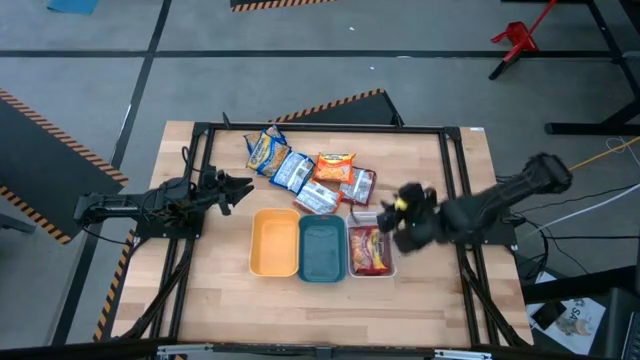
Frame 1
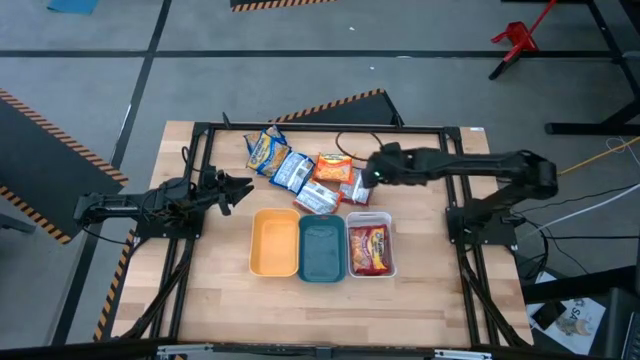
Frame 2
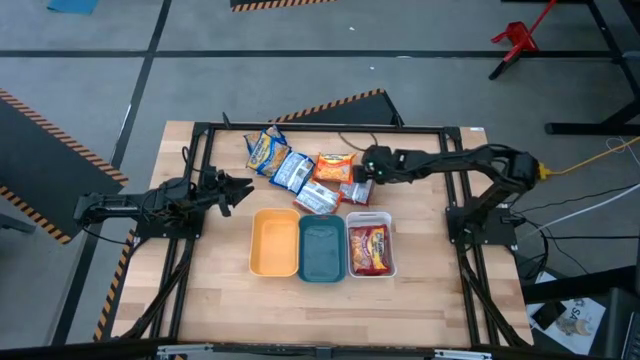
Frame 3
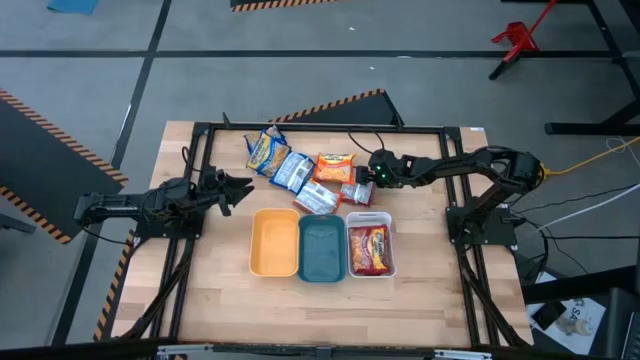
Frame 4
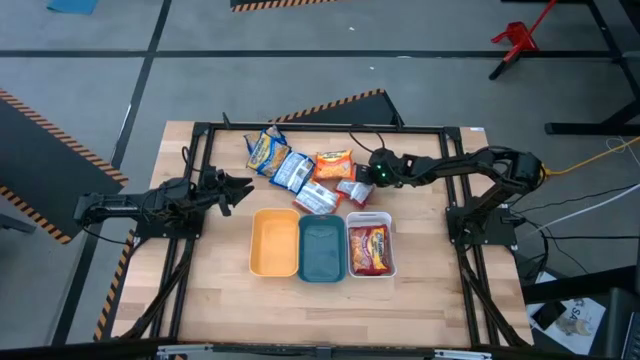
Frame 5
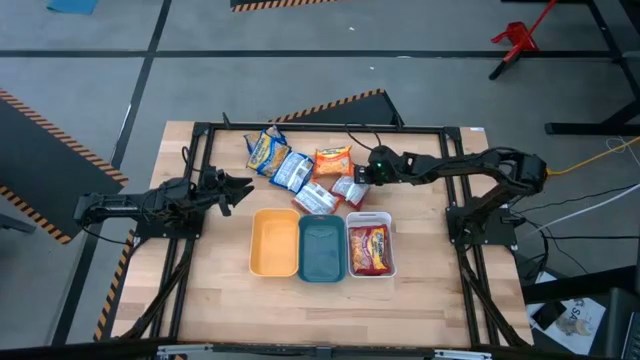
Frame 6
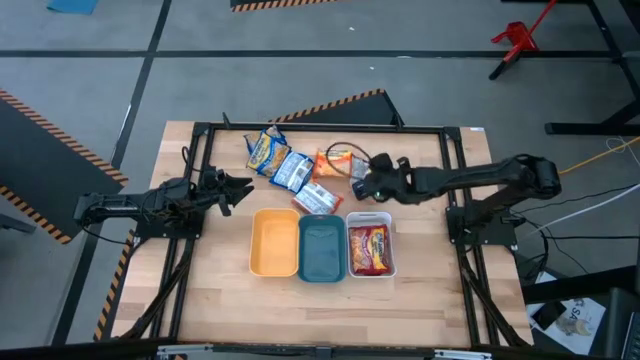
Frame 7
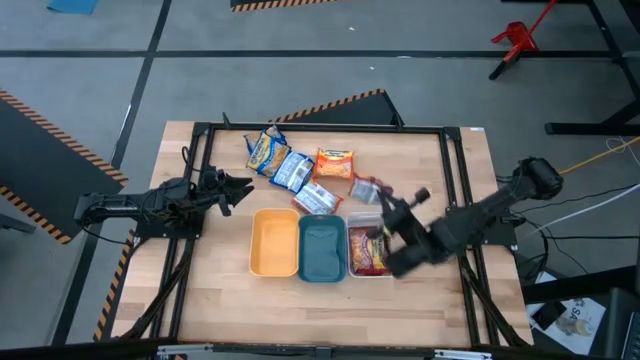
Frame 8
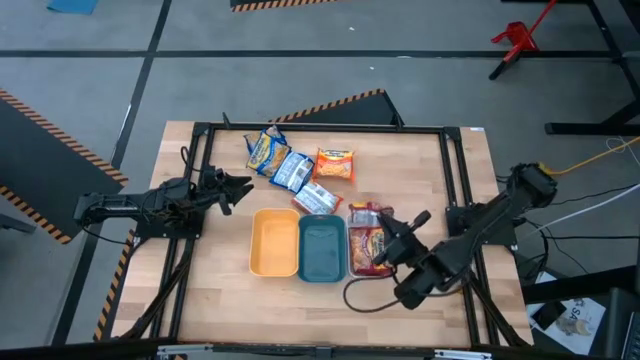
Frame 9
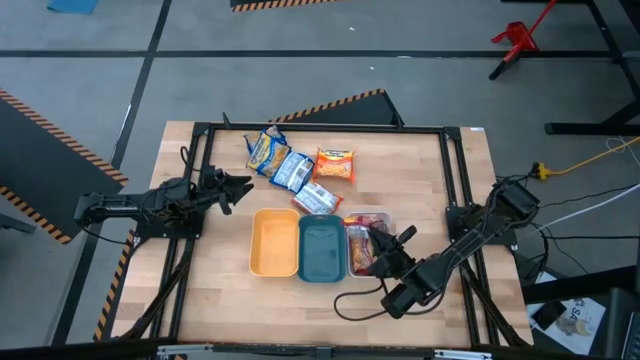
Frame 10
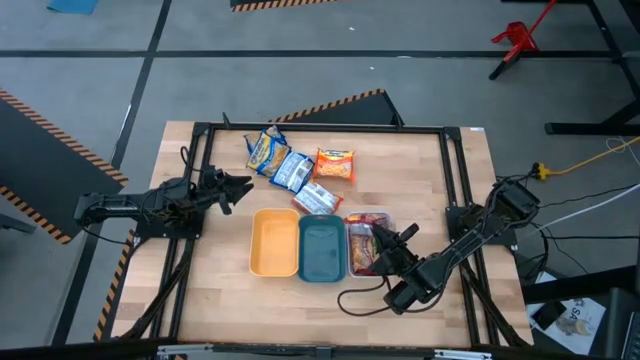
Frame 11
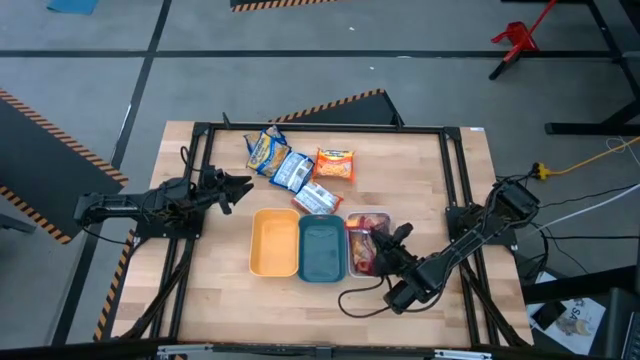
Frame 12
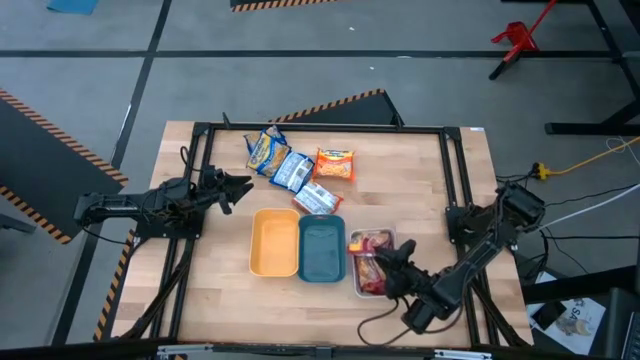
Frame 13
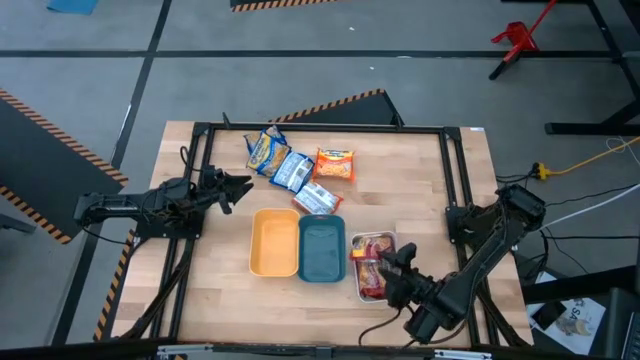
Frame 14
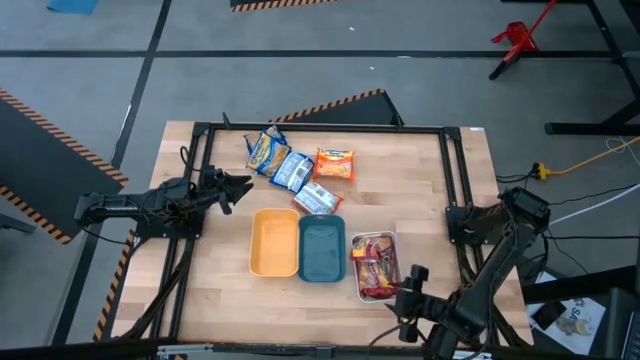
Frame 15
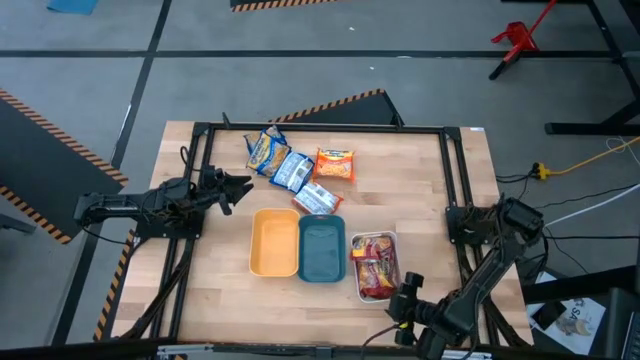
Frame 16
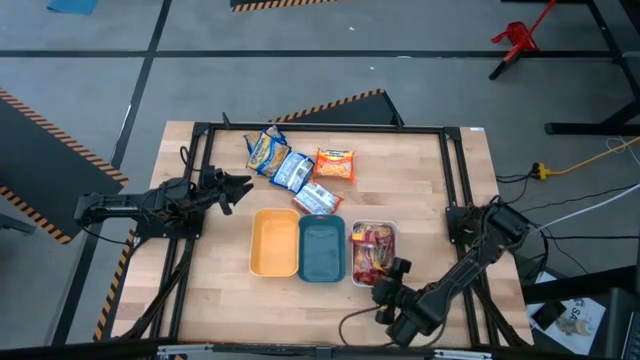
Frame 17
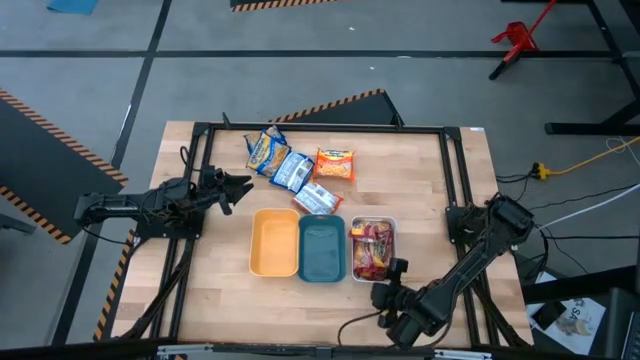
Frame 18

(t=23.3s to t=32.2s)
Task: Sort Maruchan noodles
Put the red noodle pack into the white bin

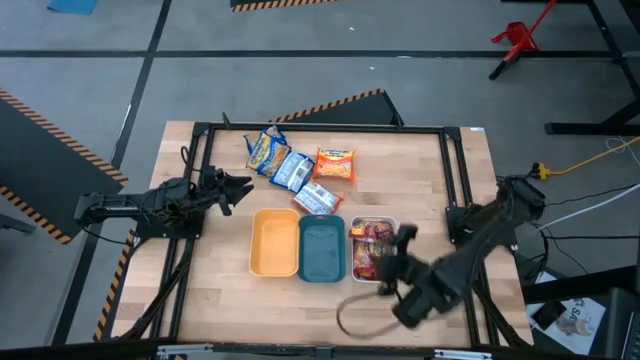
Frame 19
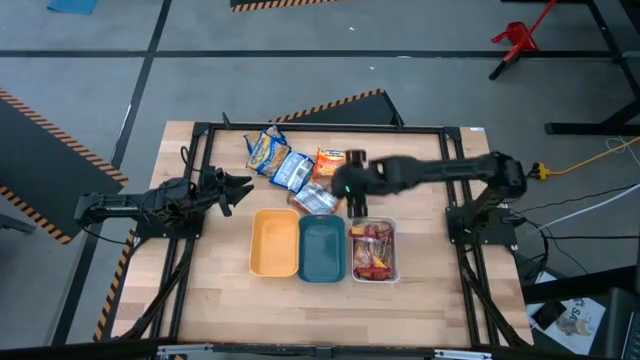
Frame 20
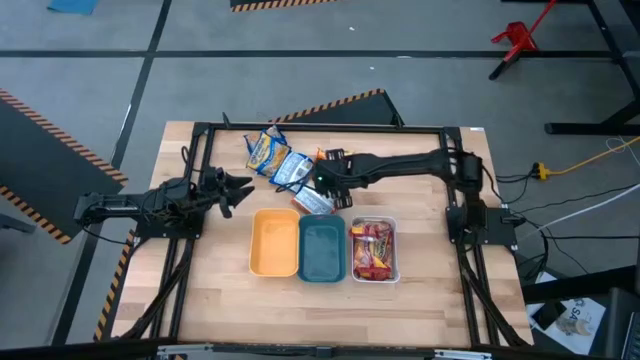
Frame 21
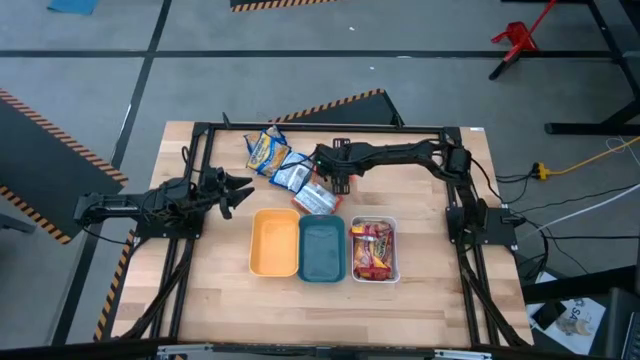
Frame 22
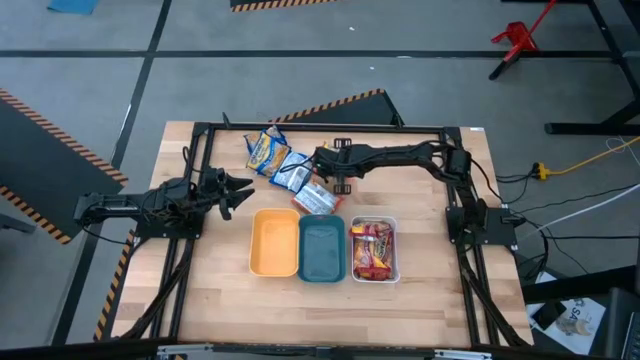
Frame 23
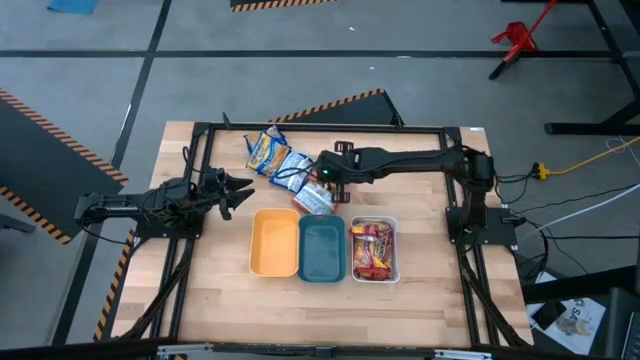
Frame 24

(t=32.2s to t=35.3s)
Put the top orange noodle pack into the blue bin

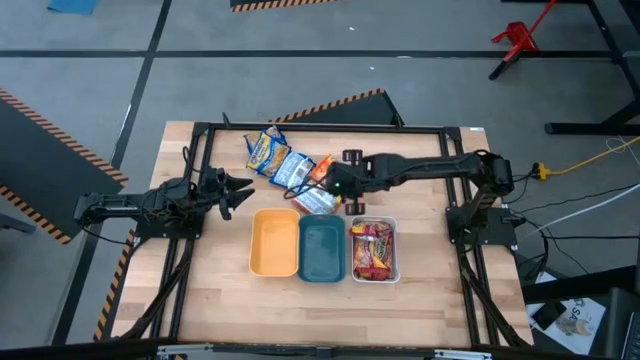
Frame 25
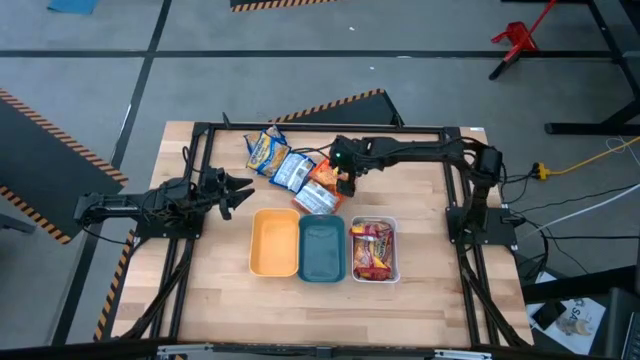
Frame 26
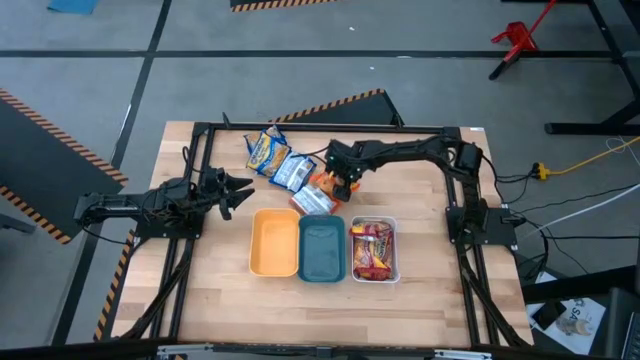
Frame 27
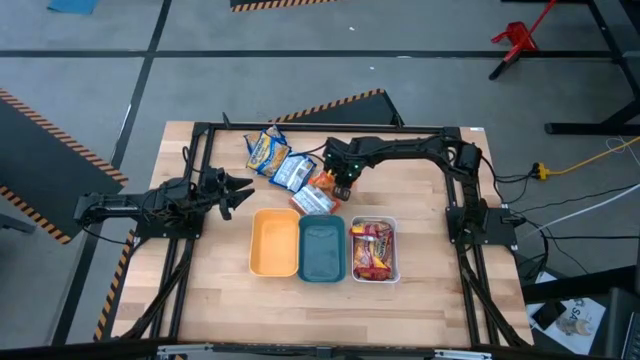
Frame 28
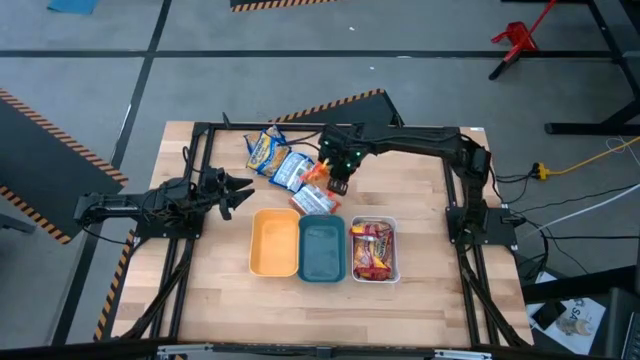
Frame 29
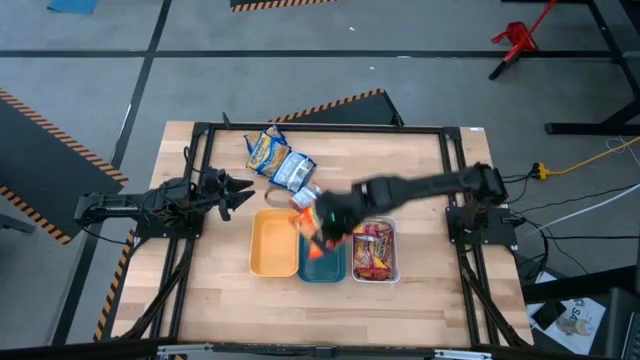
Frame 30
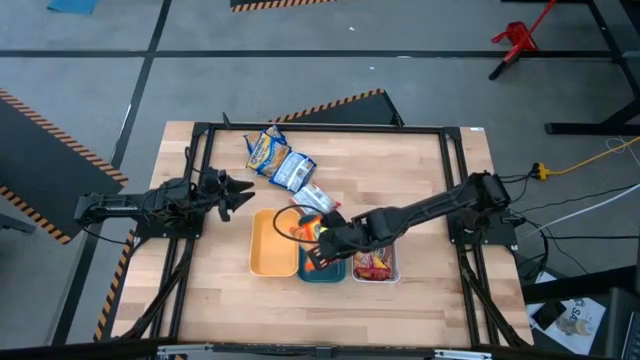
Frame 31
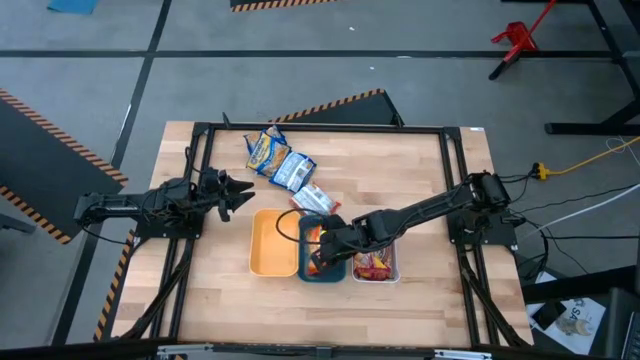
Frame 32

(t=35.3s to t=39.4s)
Put the top orange noodle pack into the blue bin

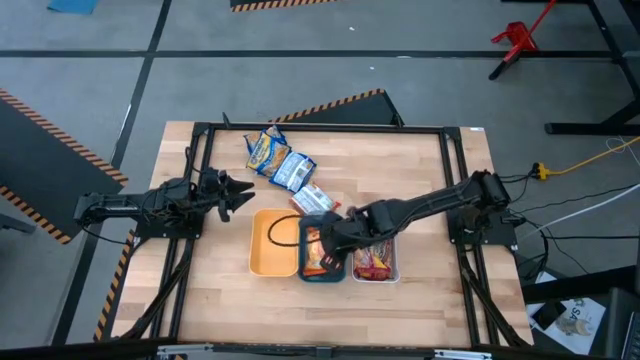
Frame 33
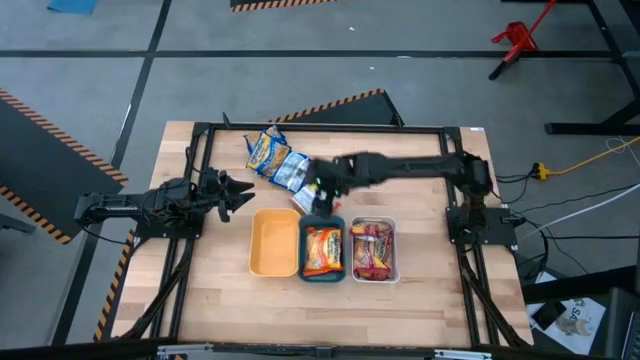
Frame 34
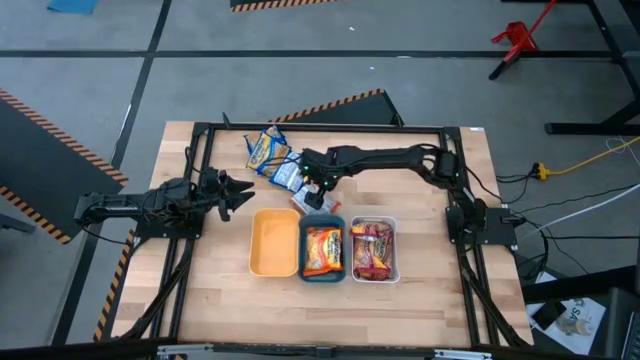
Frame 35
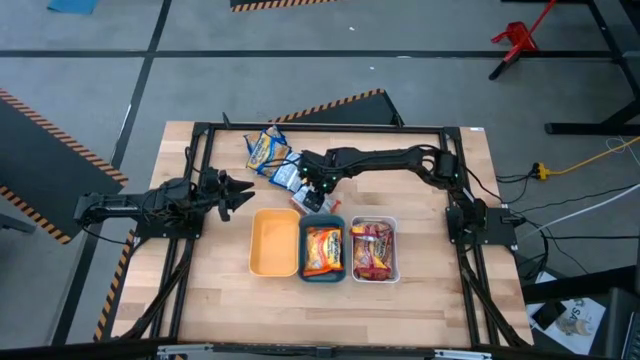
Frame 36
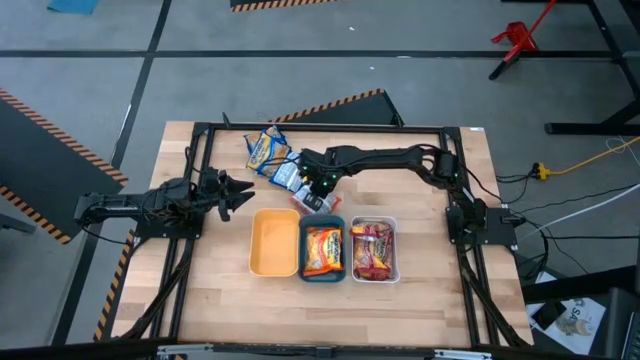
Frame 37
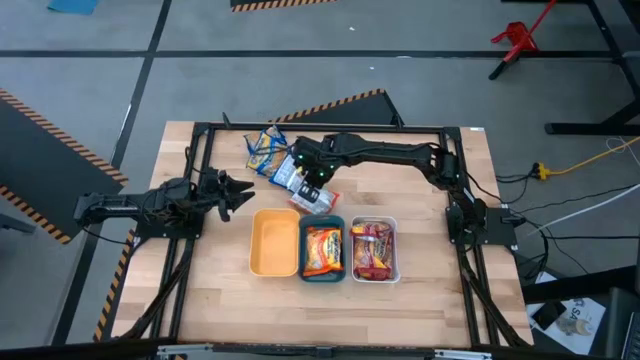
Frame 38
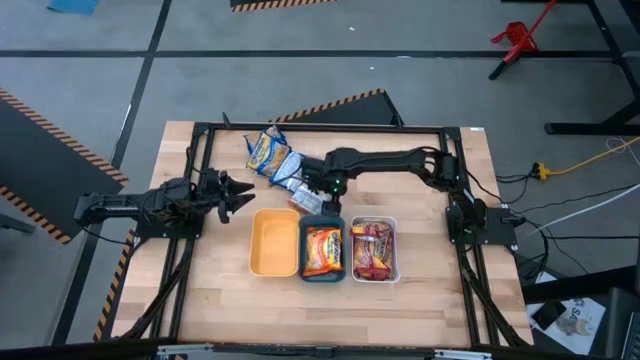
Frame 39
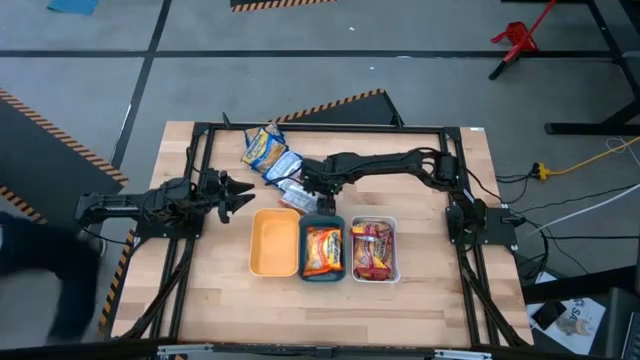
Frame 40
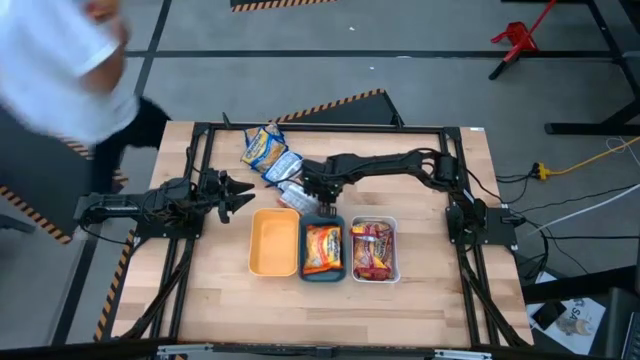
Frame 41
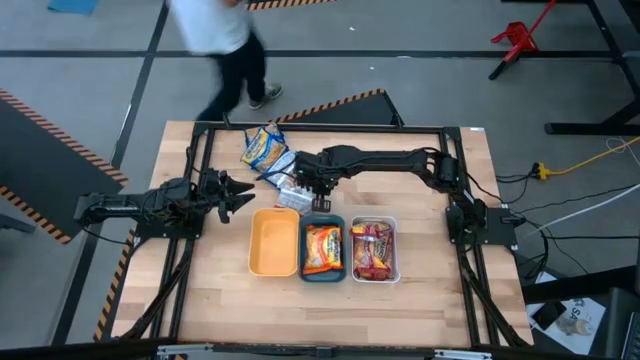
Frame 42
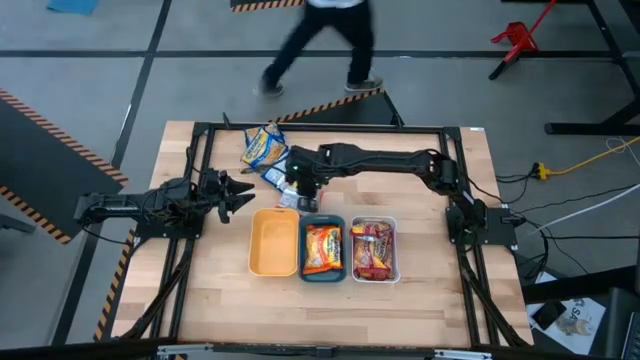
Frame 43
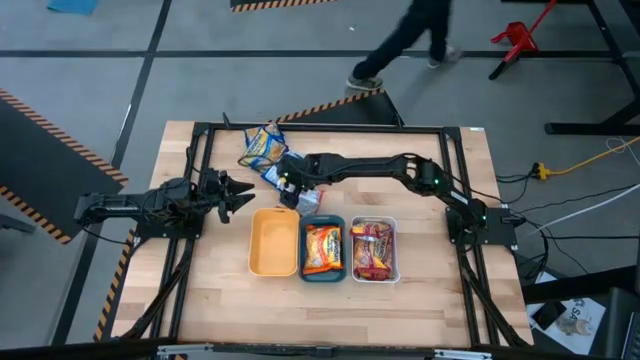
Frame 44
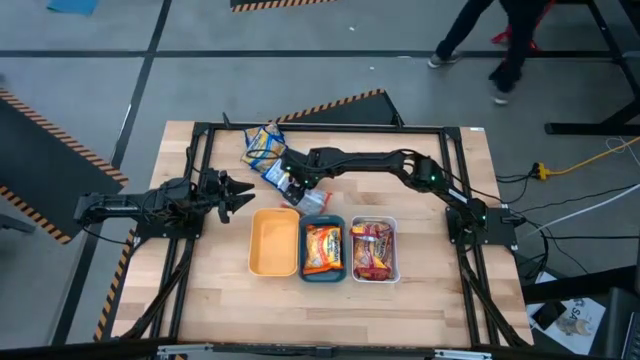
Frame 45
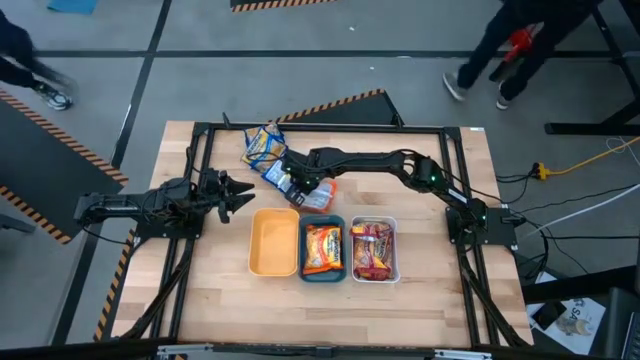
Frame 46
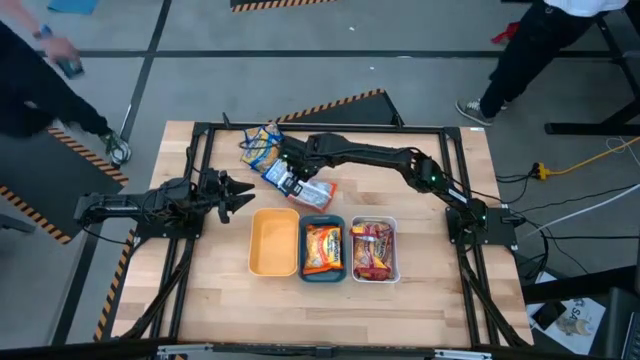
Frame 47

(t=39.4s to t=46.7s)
Put the orange noodle pack into the blue bin
